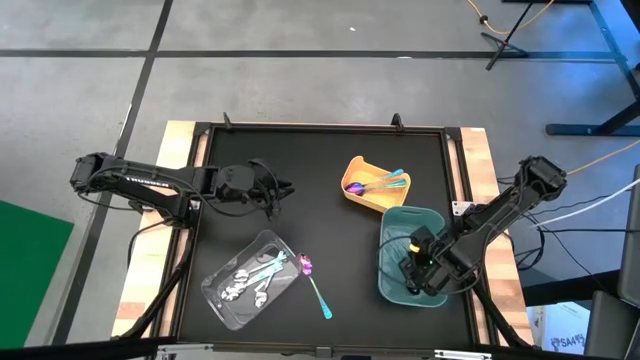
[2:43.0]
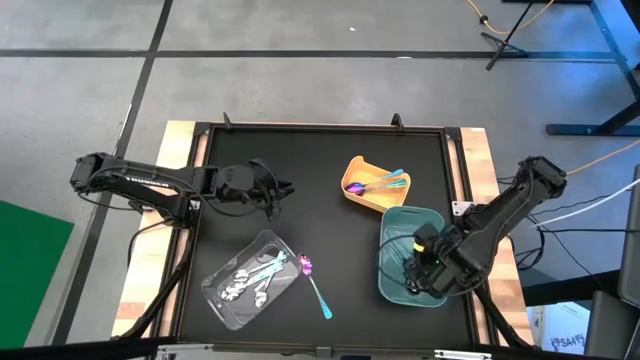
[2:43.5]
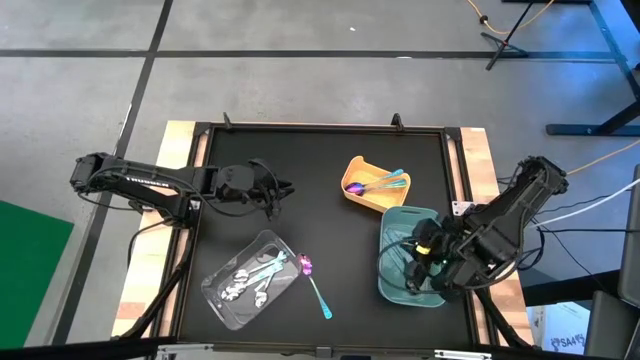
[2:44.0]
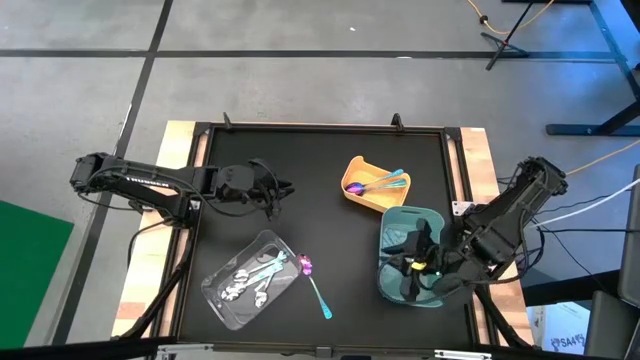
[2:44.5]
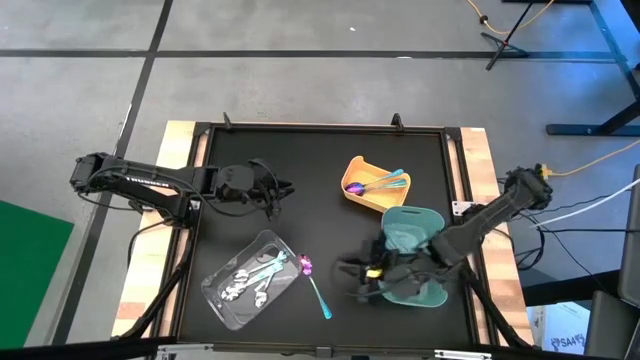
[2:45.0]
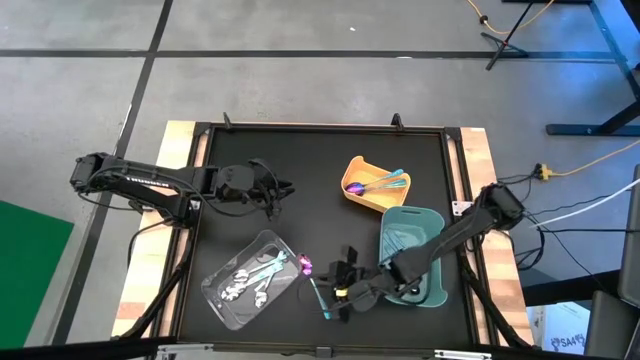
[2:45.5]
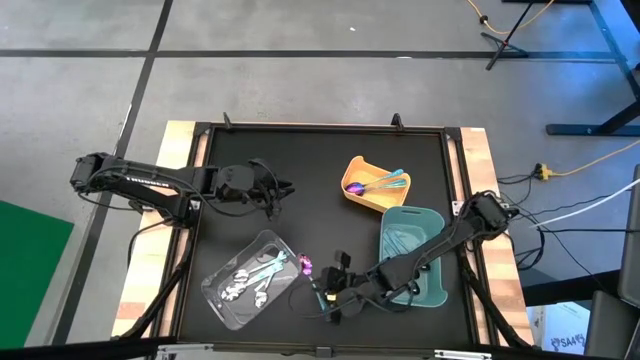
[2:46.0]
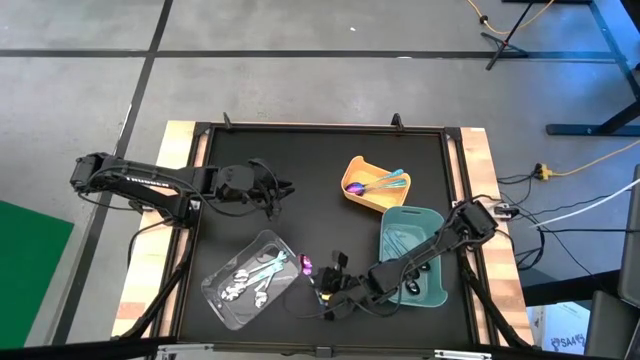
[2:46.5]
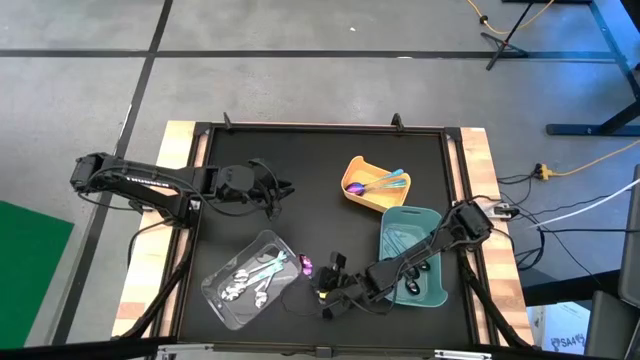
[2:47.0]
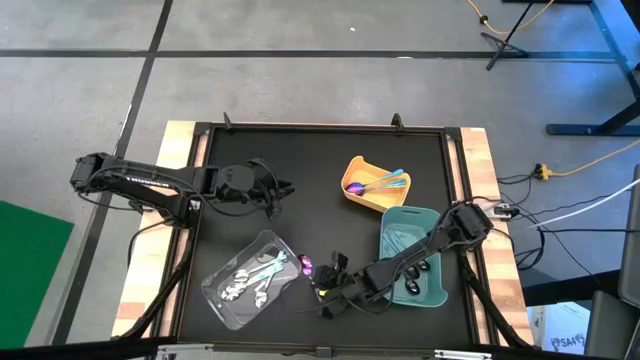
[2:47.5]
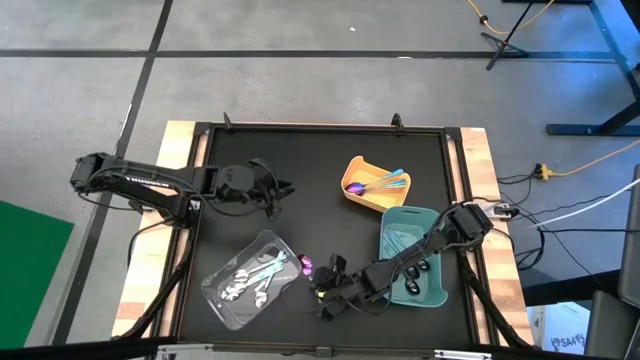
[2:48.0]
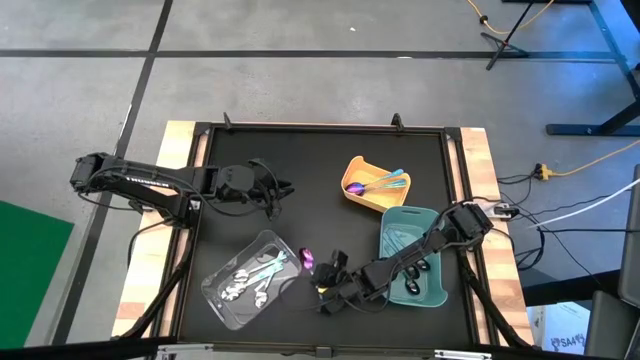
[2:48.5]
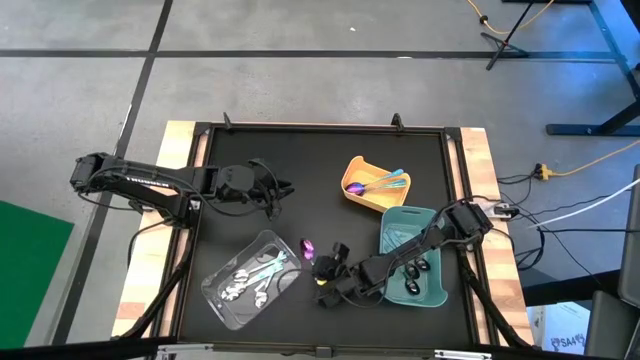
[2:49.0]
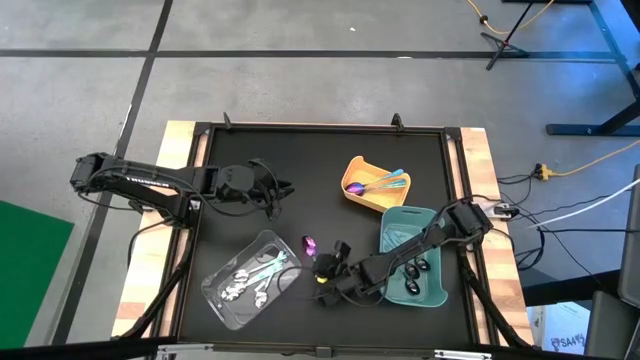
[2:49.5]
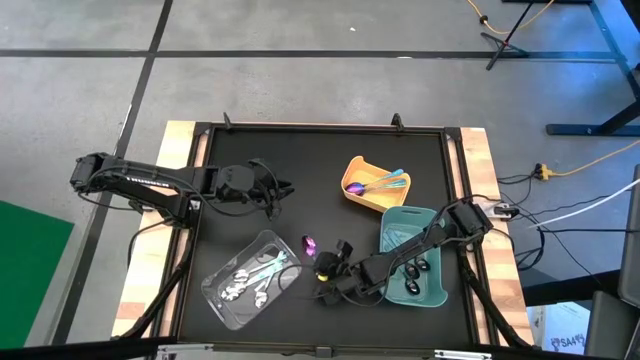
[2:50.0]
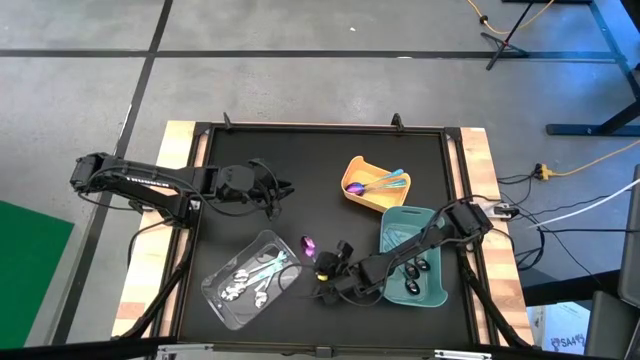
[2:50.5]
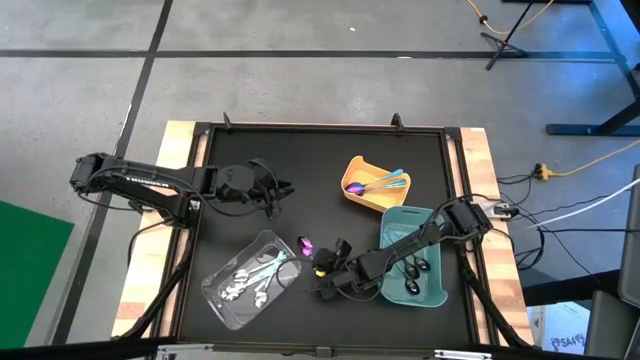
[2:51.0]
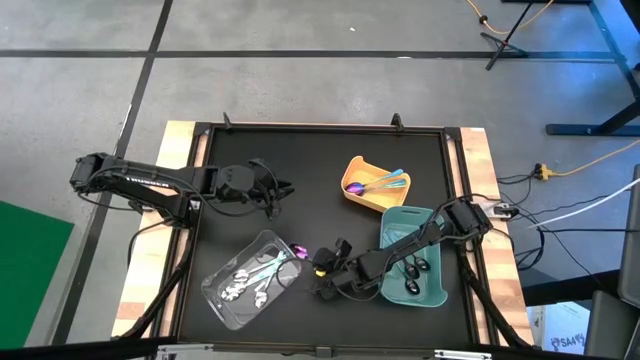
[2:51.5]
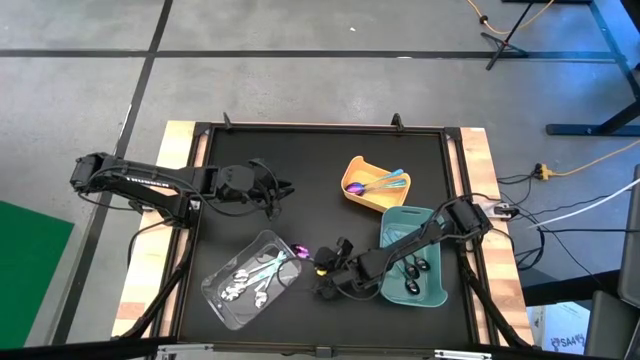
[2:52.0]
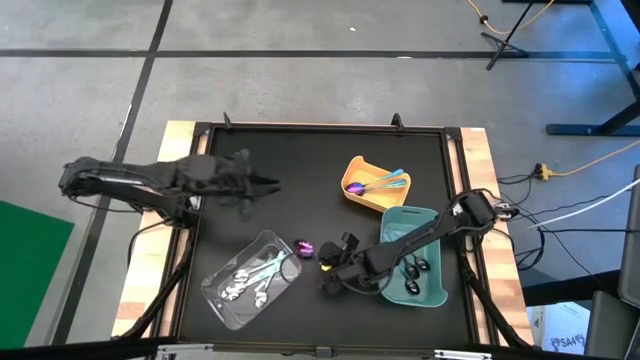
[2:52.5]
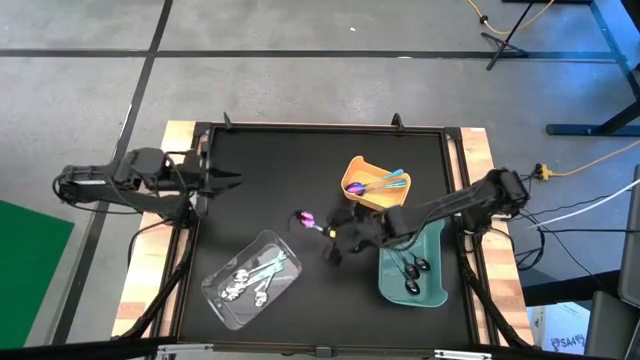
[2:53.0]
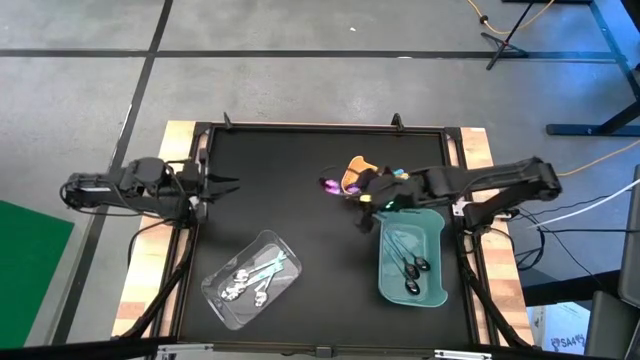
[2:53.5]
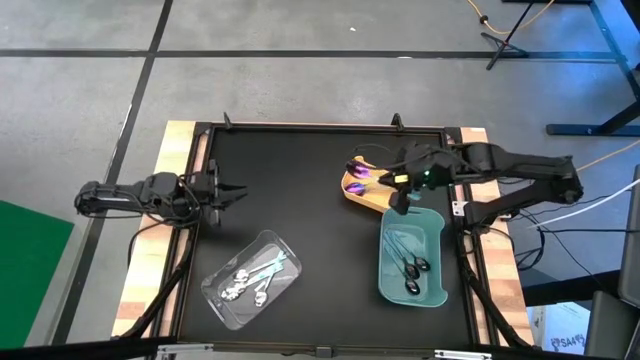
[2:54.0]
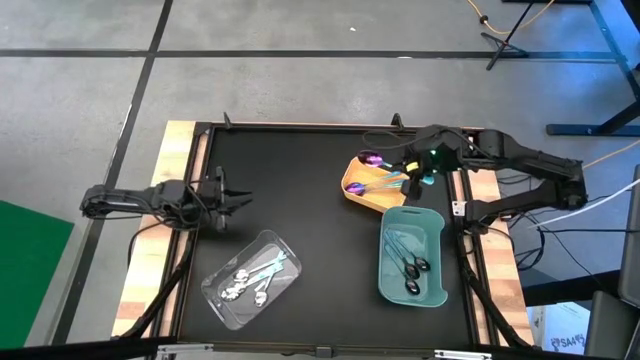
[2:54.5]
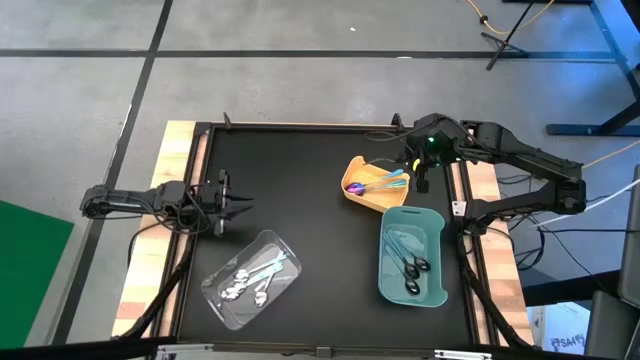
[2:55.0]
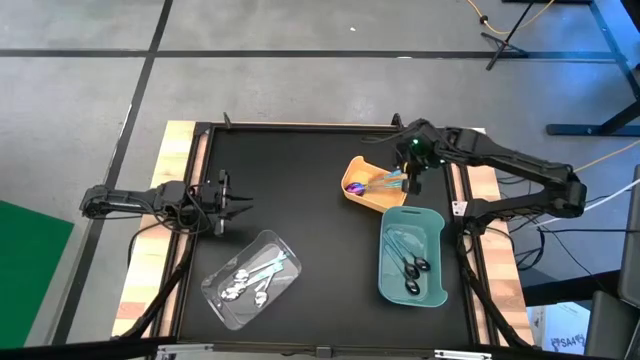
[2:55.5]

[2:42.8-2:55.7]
Task: Sort silverware by color (type)
Put the violet spoon into the yellow bin

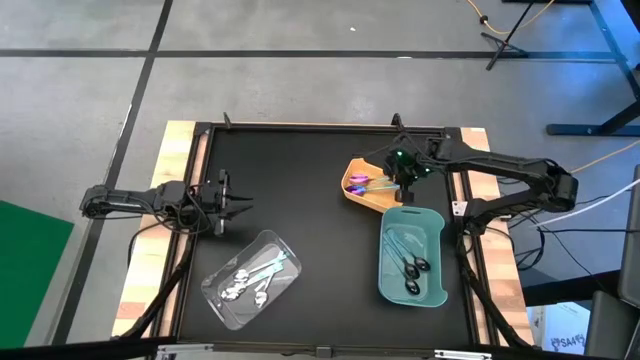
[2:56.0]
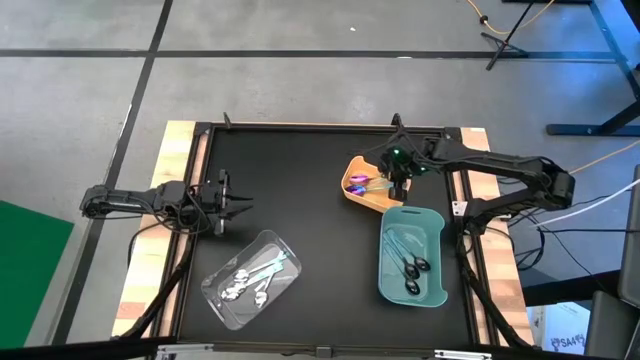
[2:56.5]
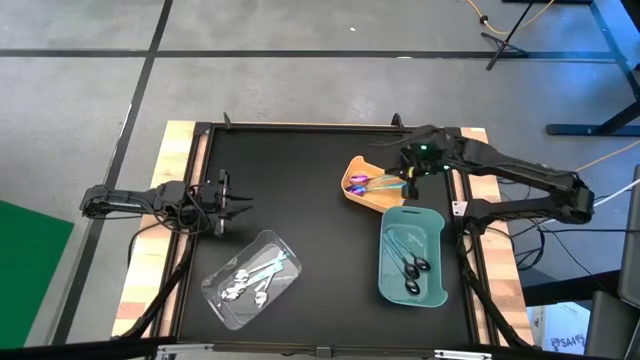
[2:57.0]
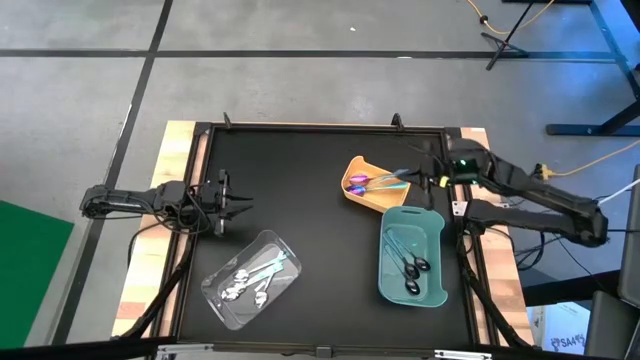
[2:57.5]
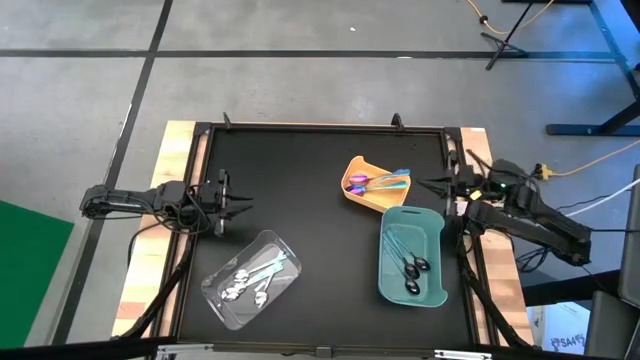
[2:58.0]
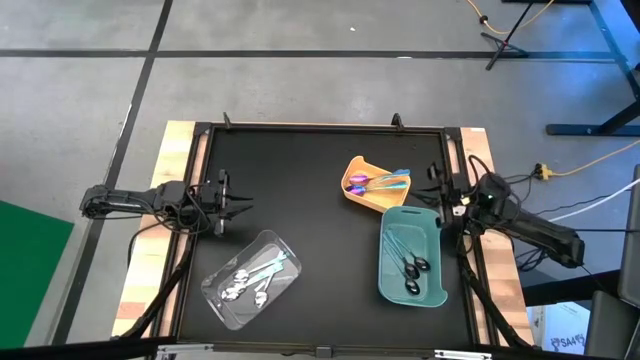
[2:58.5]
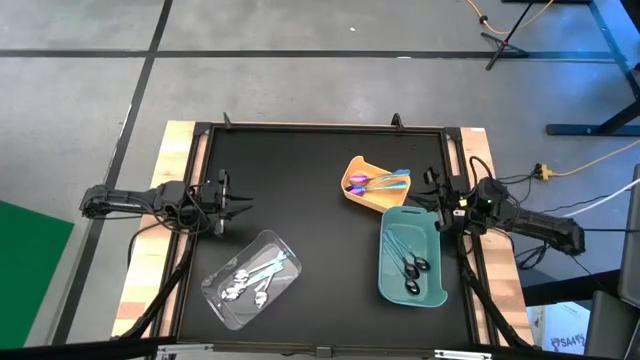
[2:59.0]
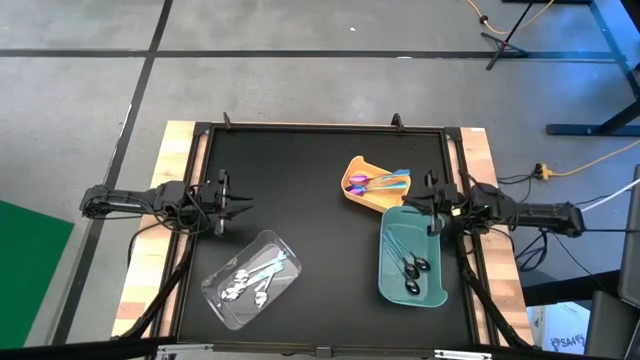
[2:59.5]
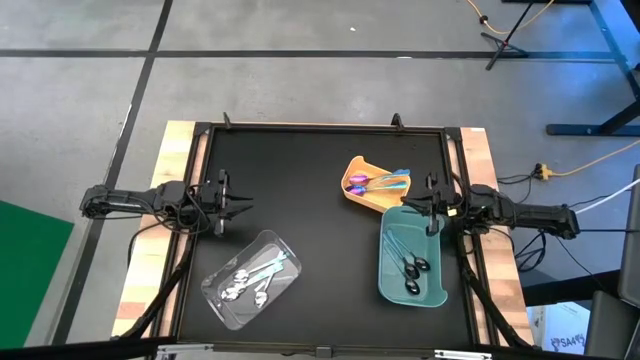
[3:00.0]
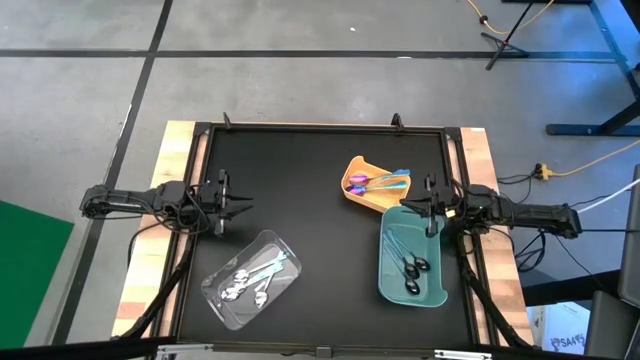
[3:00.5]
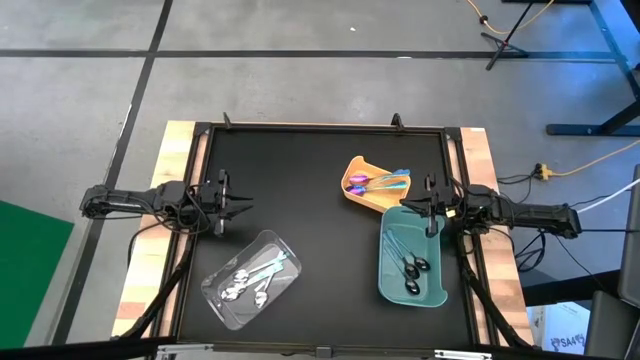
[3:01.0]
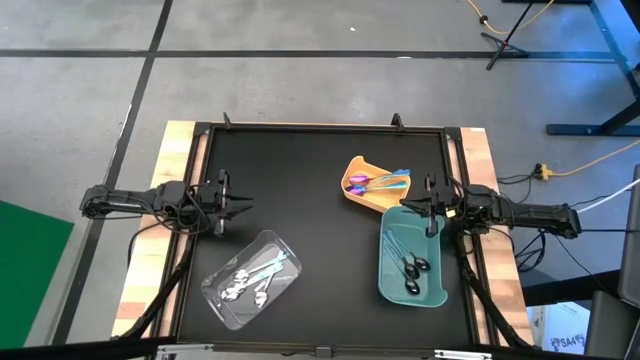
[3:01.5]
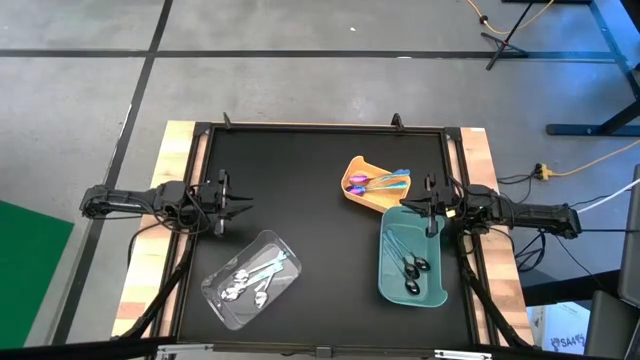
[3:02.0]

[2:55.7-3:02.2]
Return to Home Position

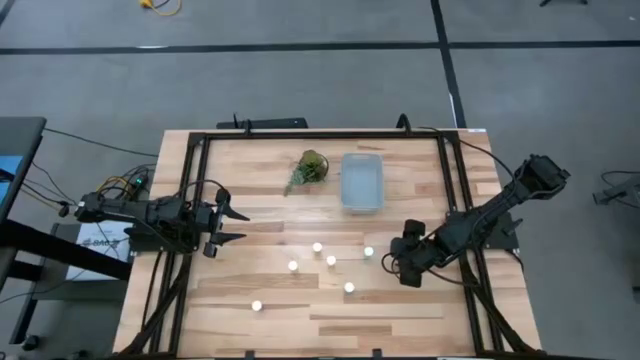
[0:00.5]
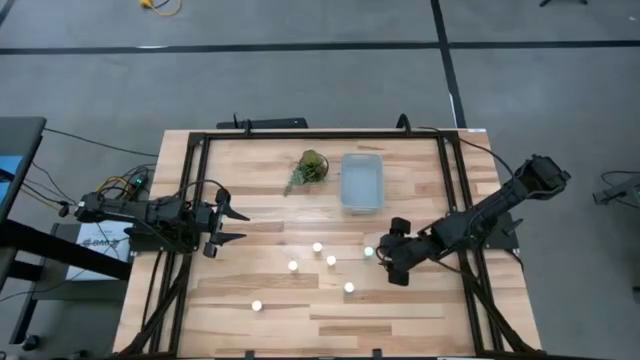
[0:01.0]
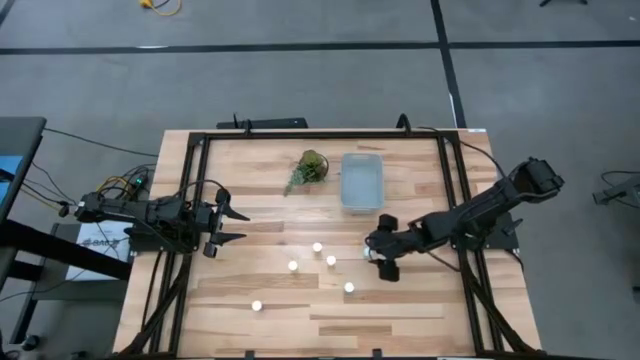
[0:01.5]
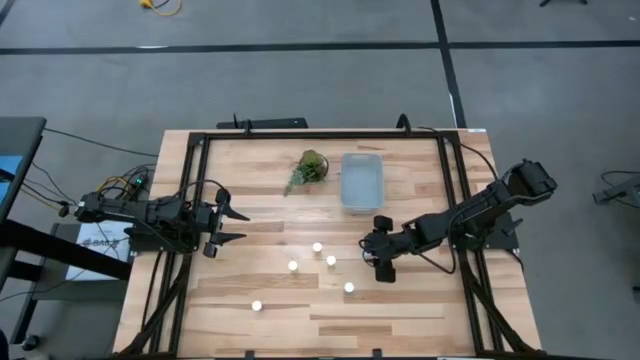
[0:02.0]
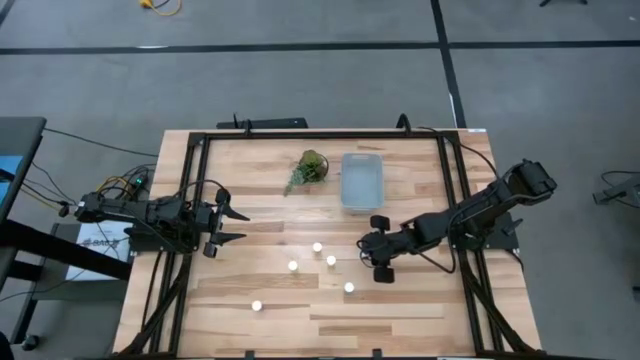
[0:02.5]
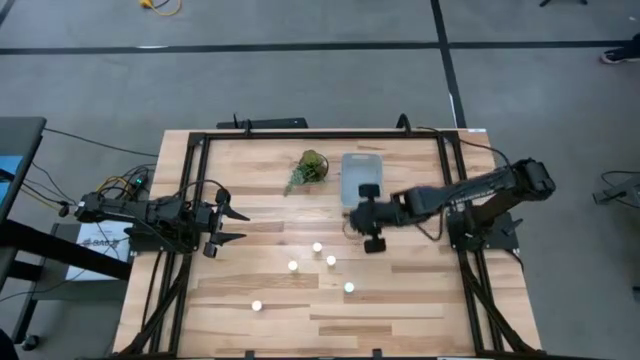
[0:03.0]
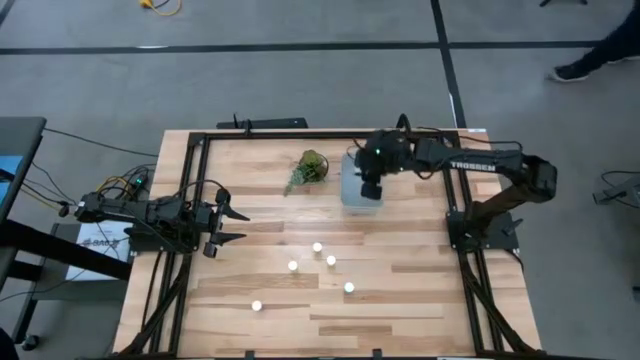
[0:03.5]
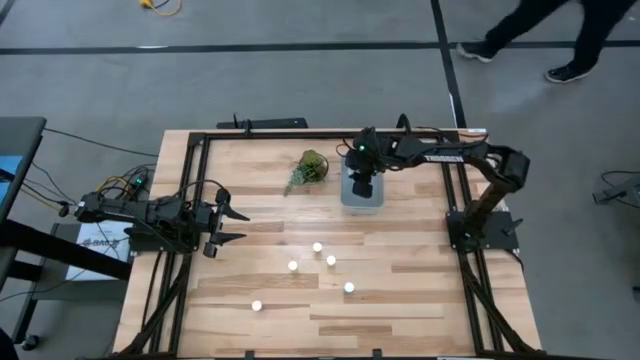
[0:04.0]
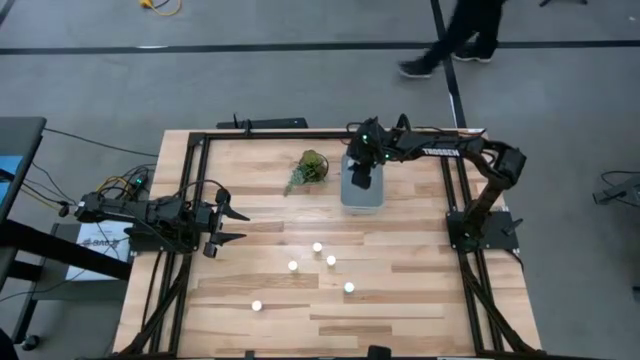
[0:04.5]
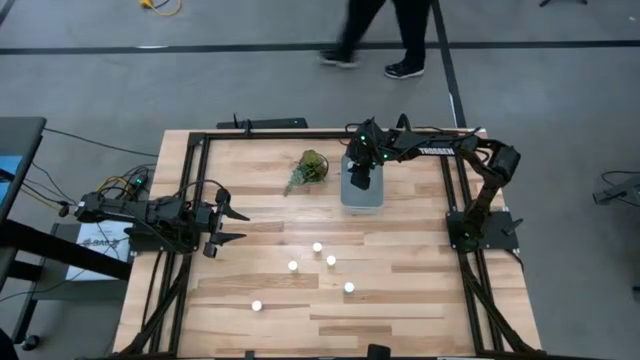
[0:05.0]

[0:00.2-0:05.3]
Task: Pick and place pill bottles into a basket
Put the top blue pill bottle into the gray bin
